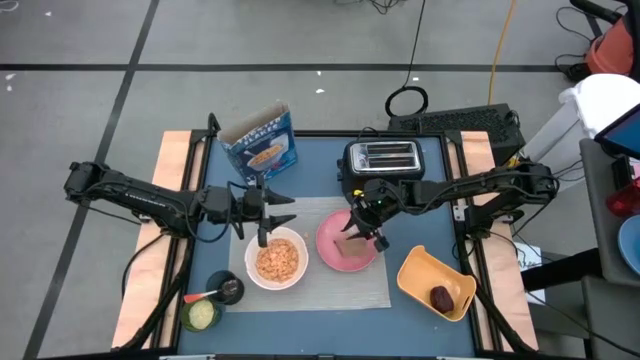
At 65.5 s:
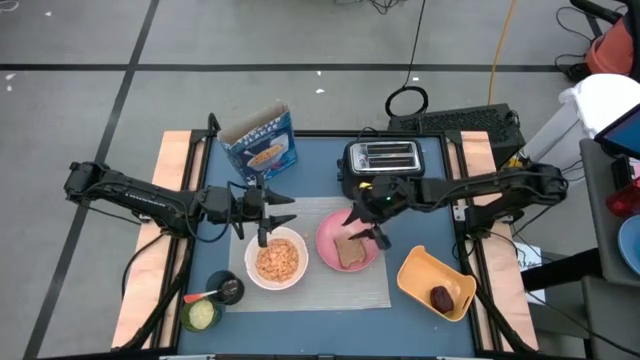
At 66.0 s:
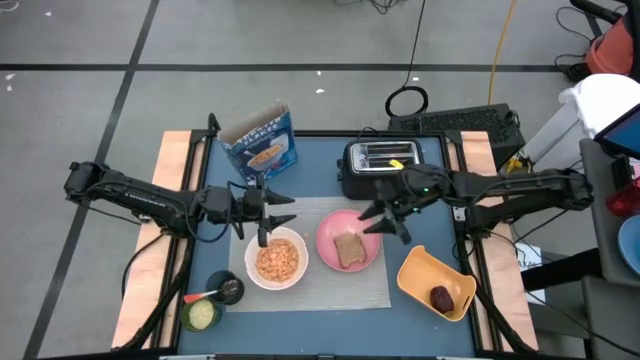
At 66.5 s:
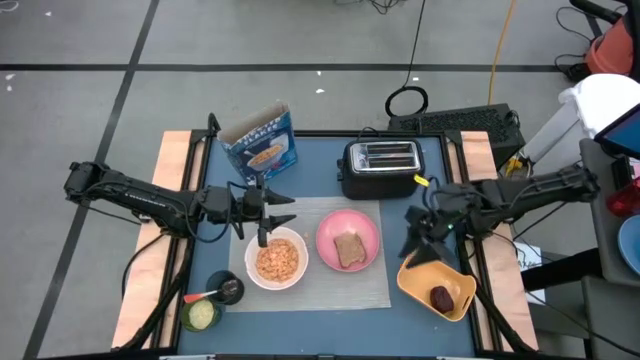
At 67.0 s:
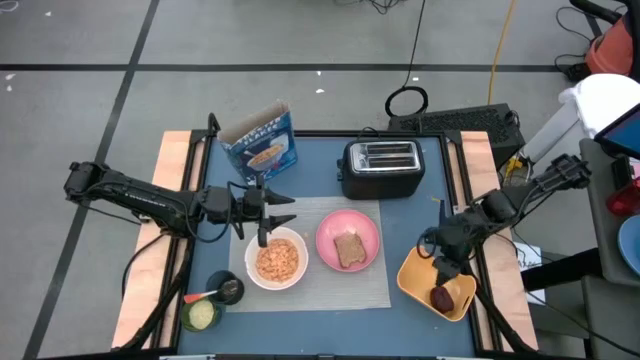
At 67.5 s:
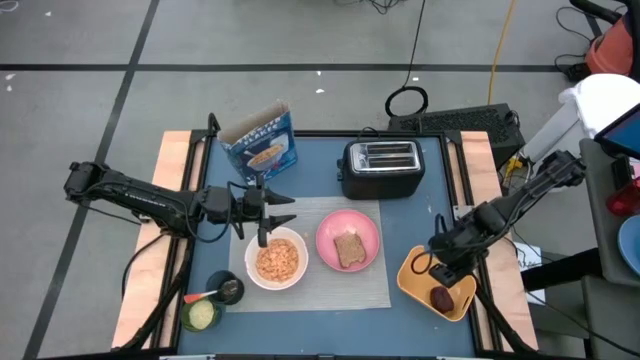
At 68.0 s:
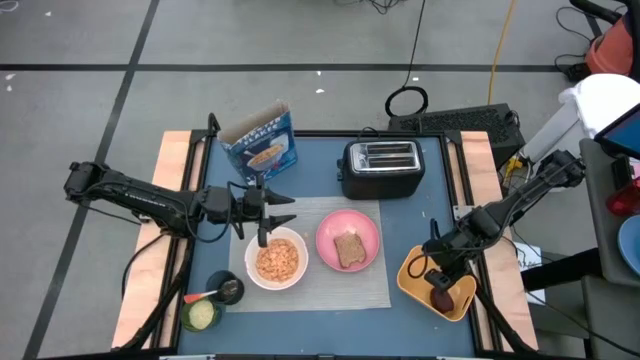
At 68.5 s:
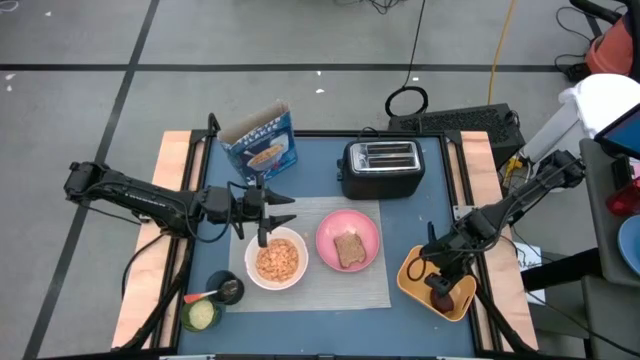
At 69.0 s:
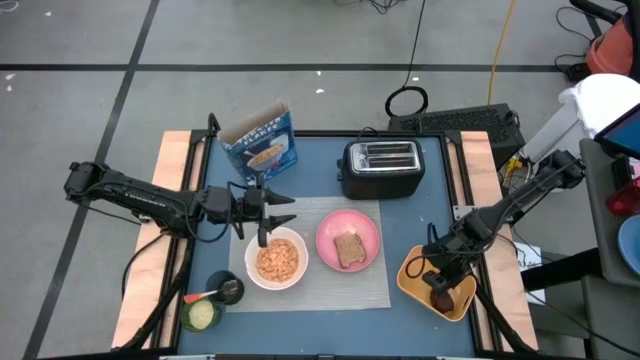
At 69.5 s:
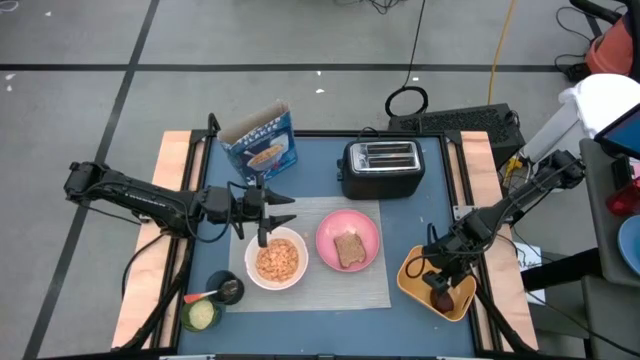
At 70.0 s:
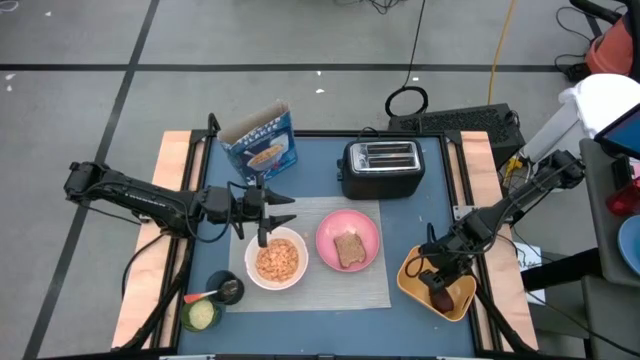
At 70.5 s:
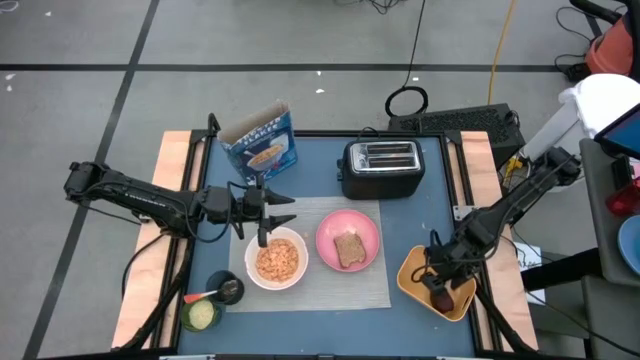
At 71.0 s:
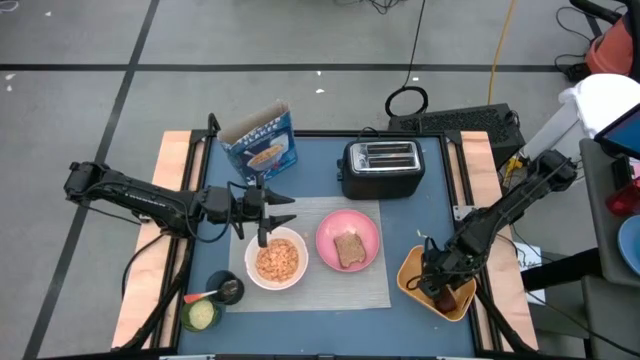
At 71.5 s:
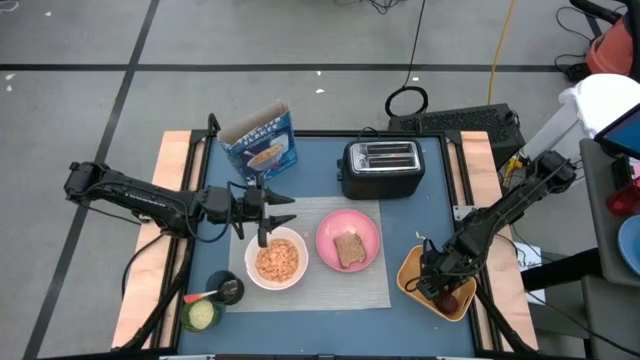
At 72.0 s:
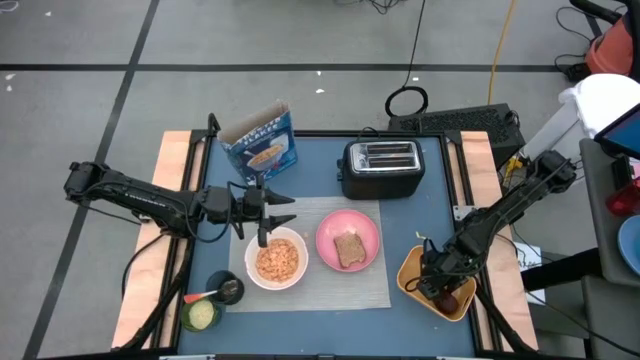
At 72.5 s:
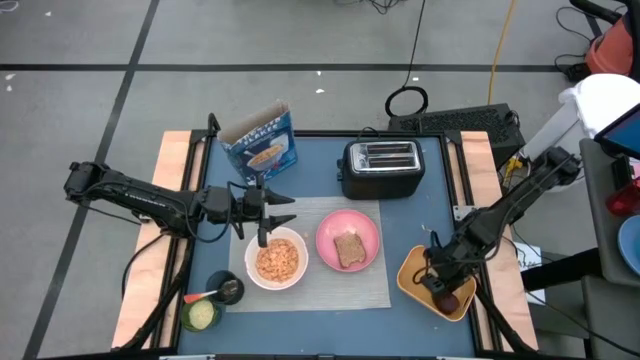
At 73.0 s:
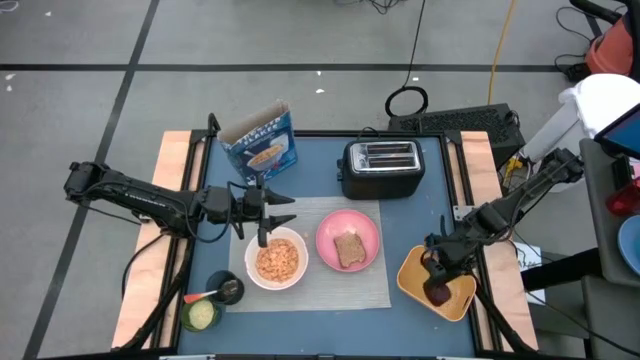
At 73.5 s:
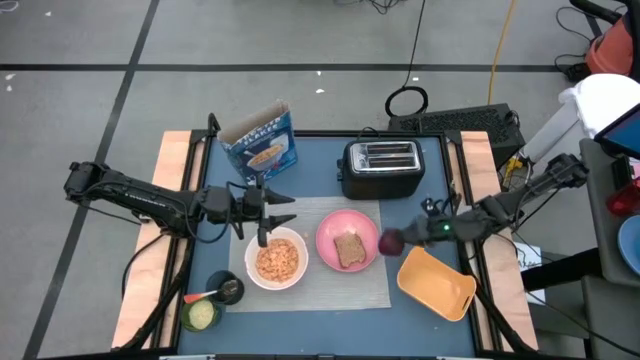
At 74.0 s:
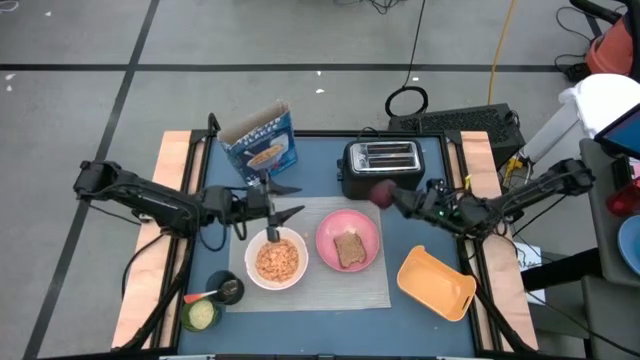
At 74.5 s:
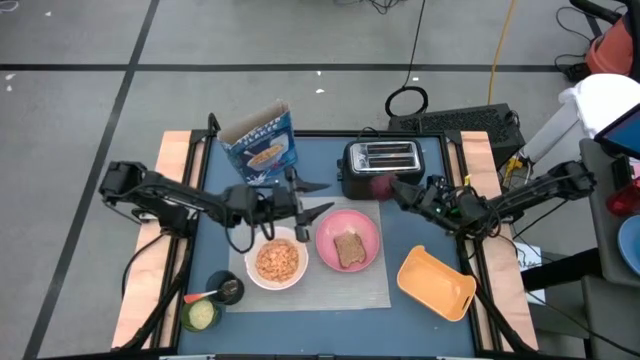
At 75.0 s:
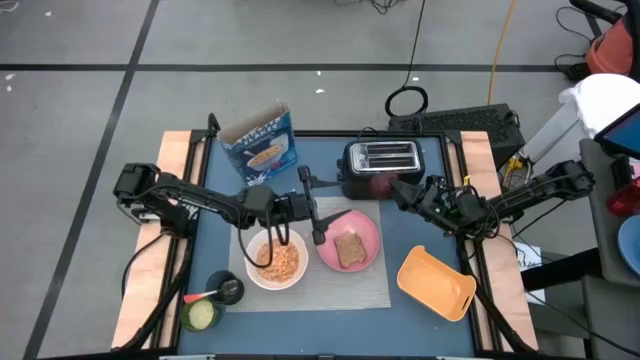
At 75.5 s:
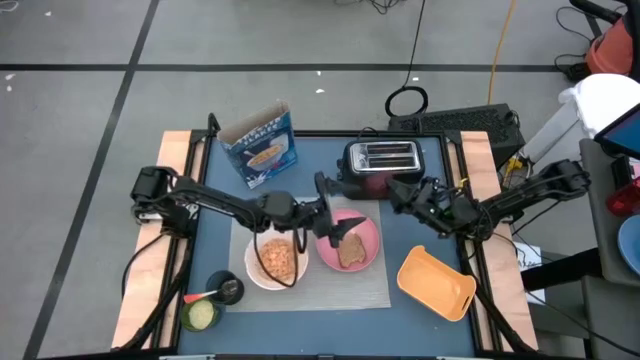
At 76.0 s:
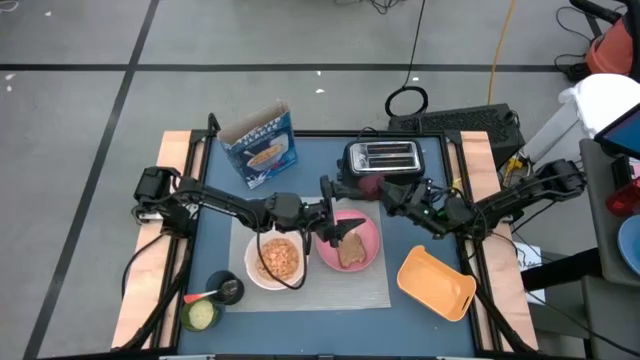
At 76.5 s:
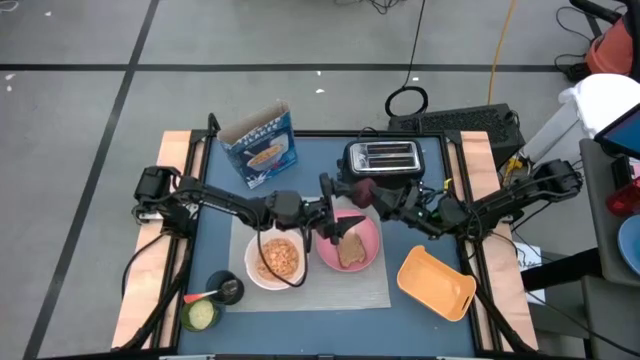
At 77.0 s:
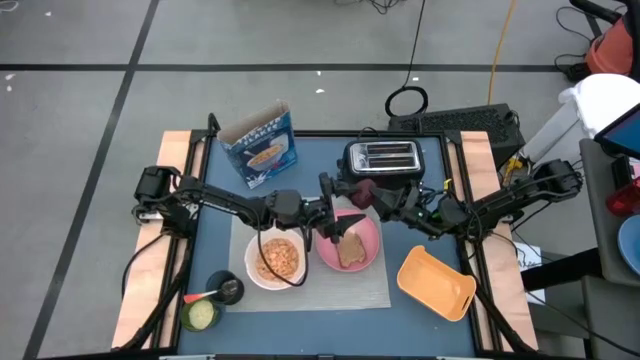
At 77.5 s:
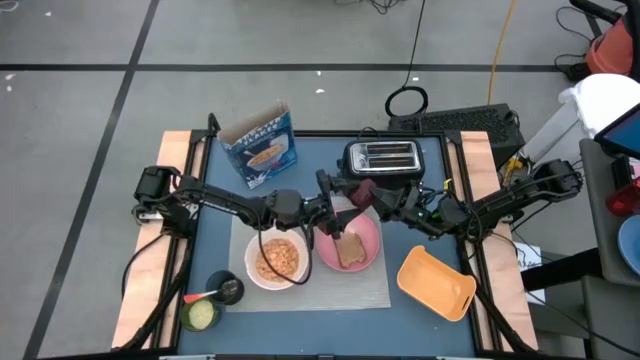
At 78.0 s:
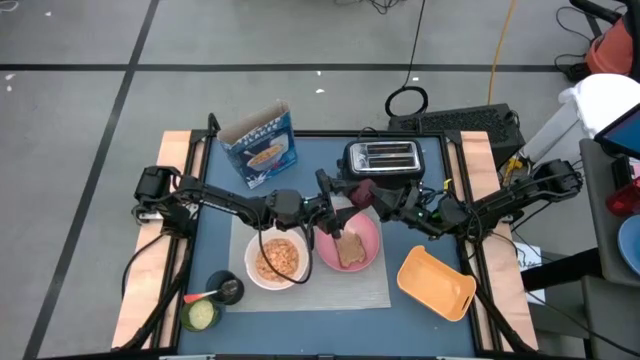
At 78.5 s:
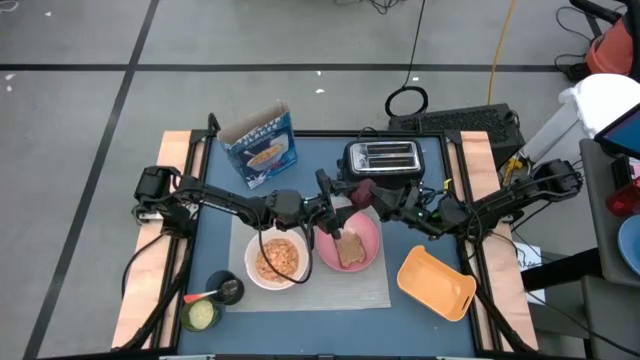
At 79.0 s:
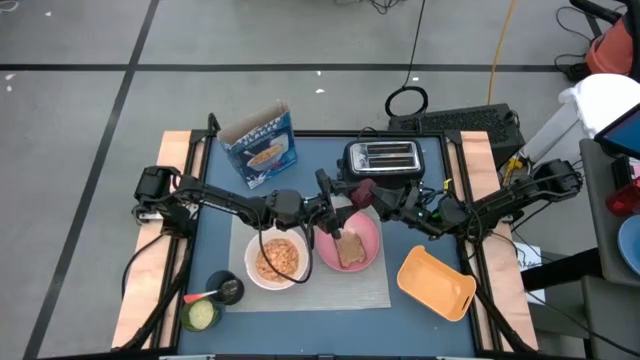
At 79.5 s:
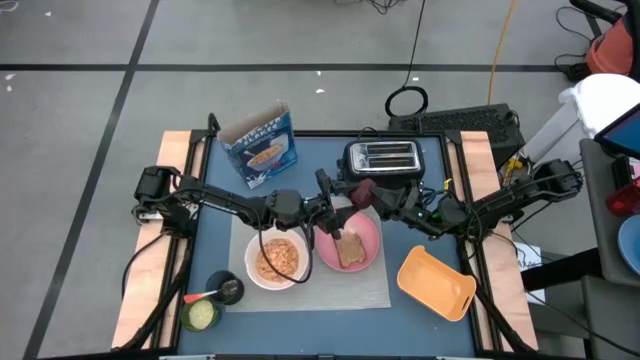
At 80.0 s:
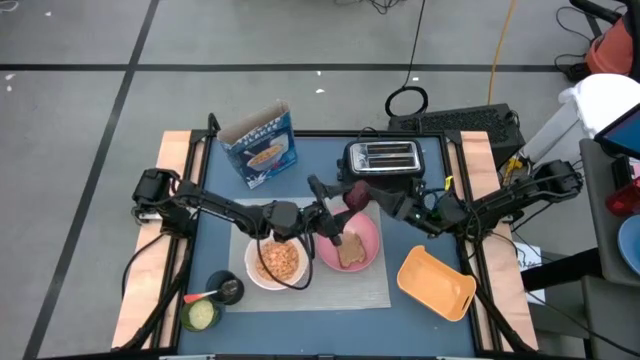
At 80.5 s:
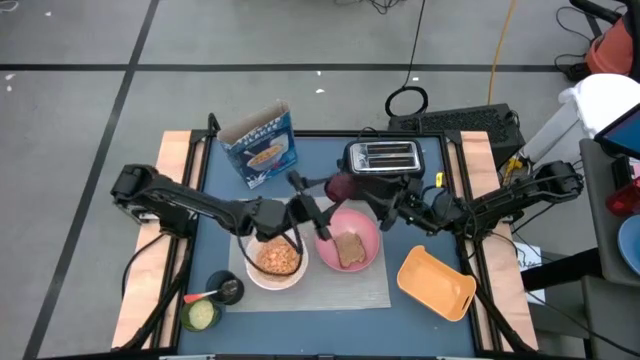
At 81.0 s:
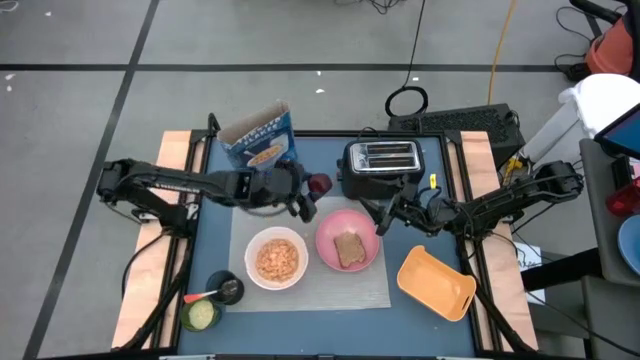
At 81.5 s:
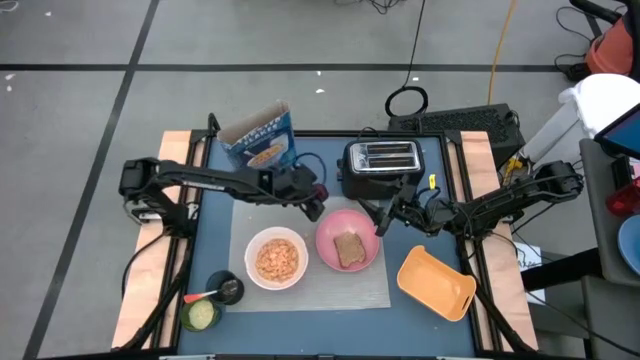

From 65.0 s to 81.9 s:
Task: Arrange a breakfast setting
Put the apple on the mat

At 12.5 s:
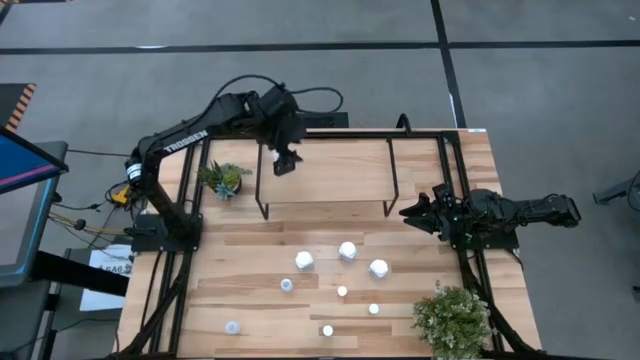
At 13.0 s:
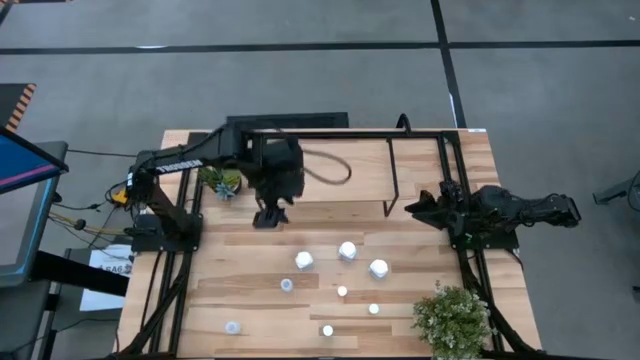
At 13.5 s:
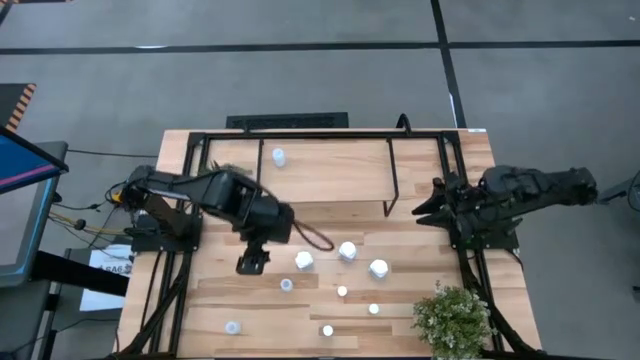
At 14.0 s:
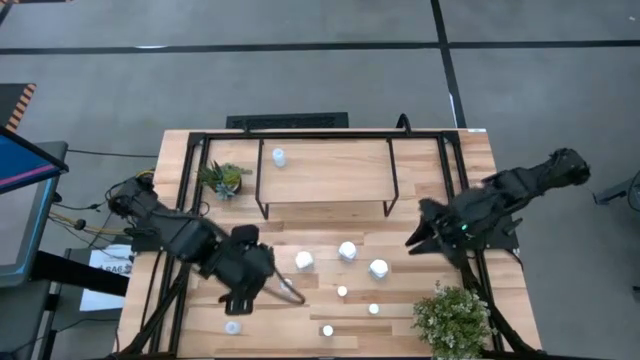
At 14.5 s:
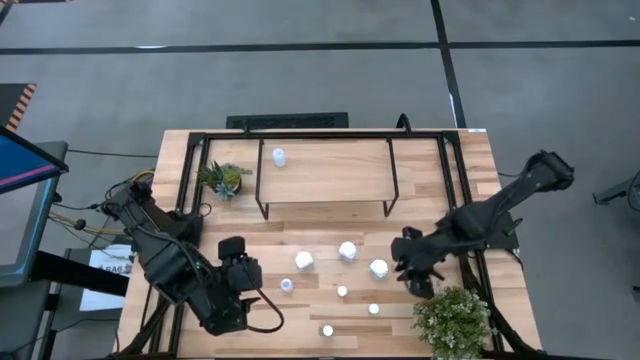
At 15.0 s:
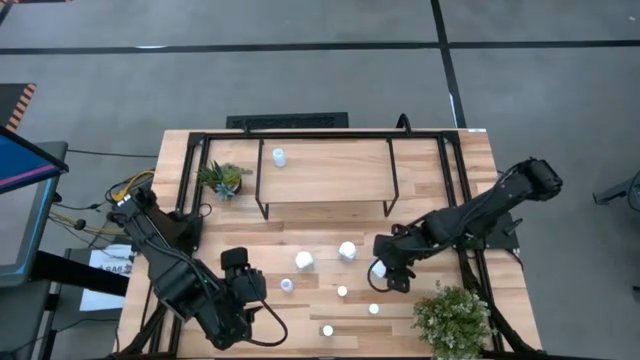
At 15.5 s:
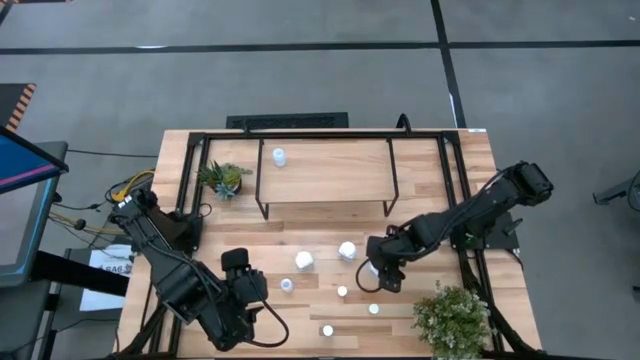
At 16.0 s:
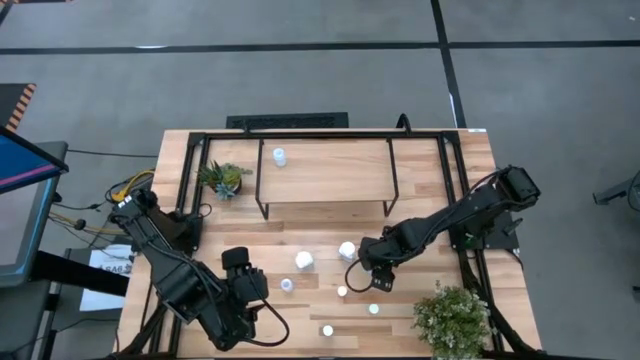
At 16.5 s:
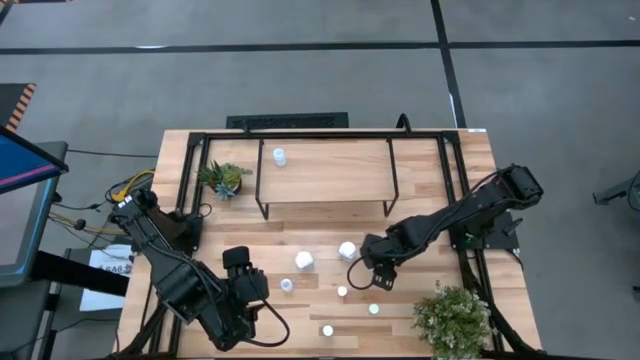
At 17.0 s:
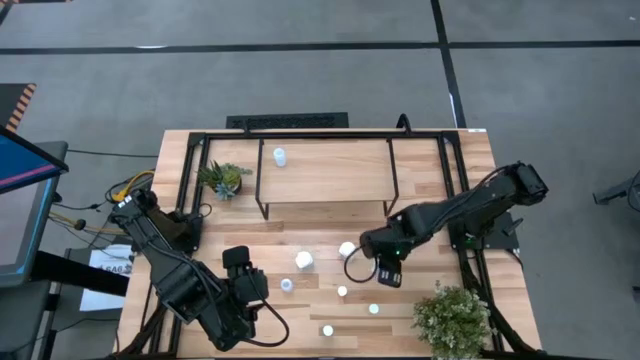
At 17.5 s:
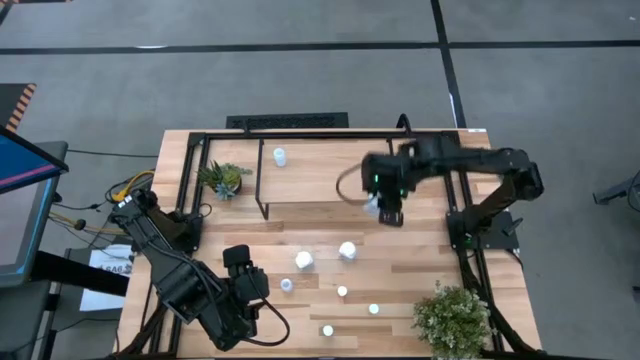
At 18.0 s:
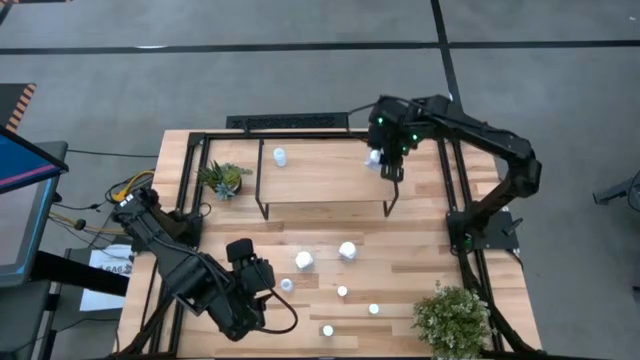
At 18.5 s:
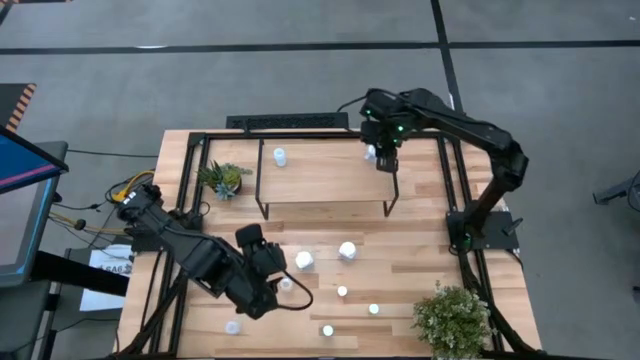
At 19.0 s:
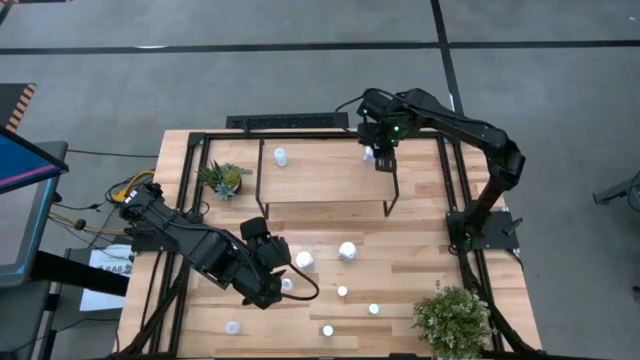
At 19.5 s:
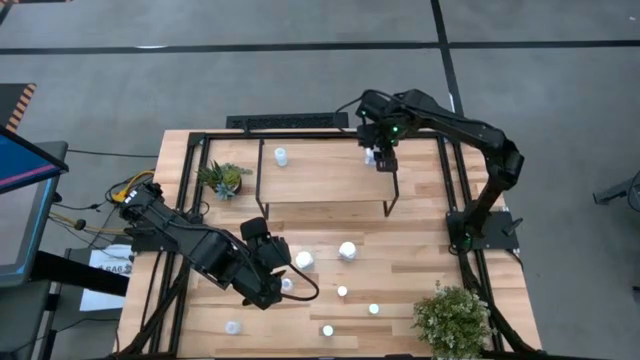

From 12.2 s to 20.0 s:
Task: Pick and place medicine bottles onto shelf by color
Put the right white and blue pill bottle on the shelf
